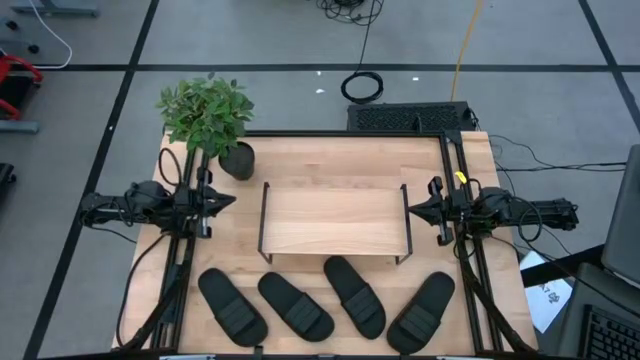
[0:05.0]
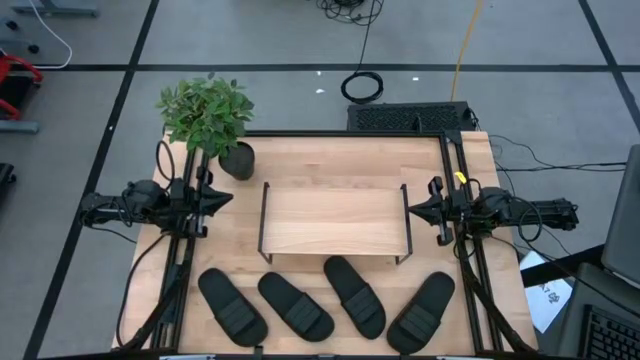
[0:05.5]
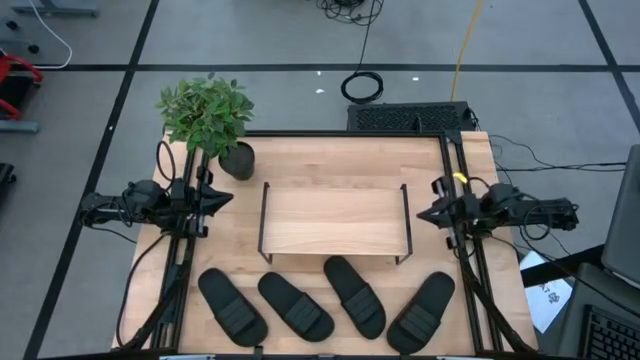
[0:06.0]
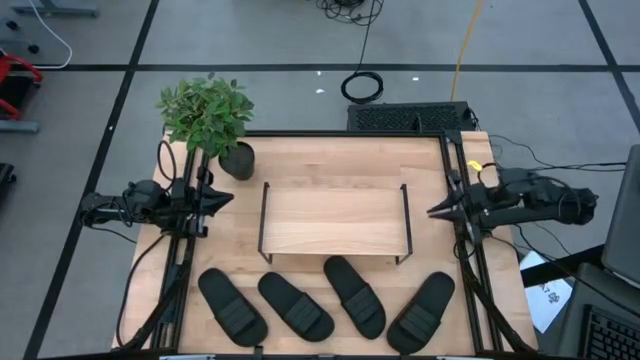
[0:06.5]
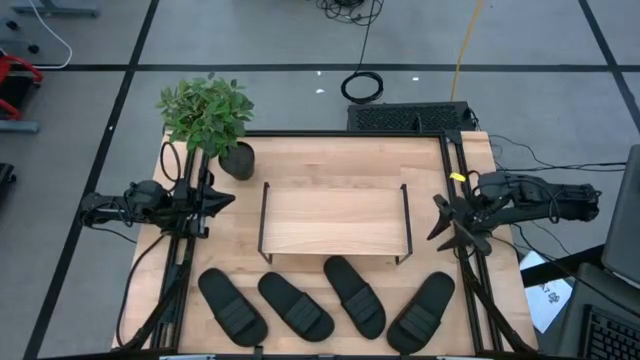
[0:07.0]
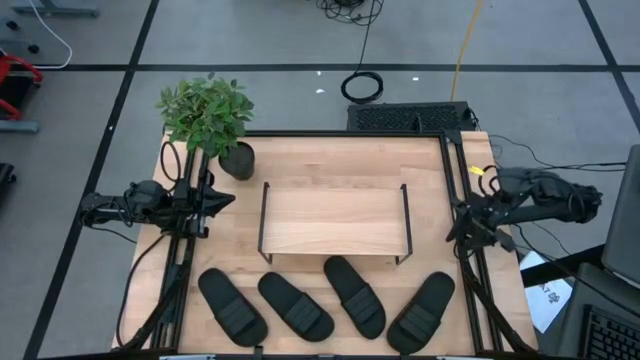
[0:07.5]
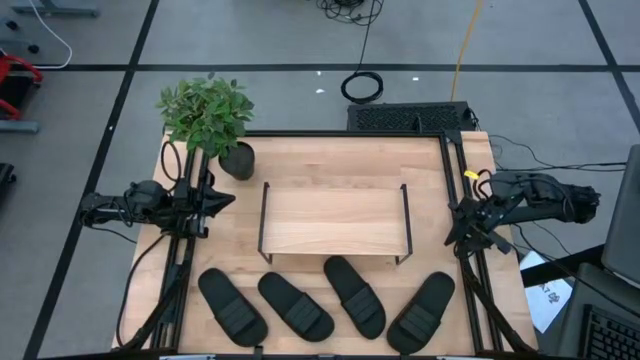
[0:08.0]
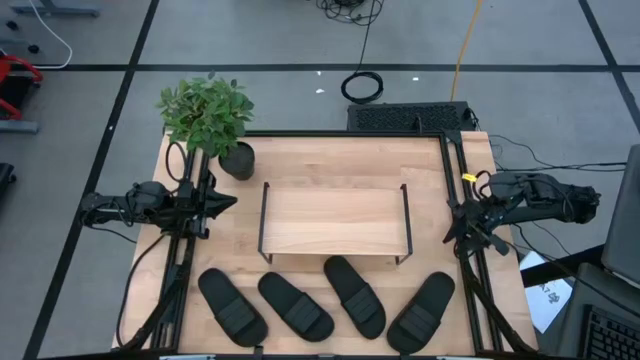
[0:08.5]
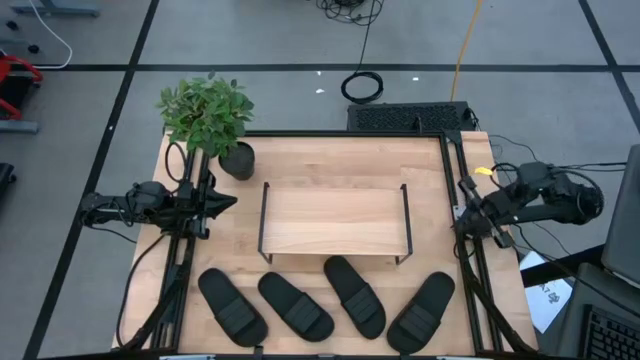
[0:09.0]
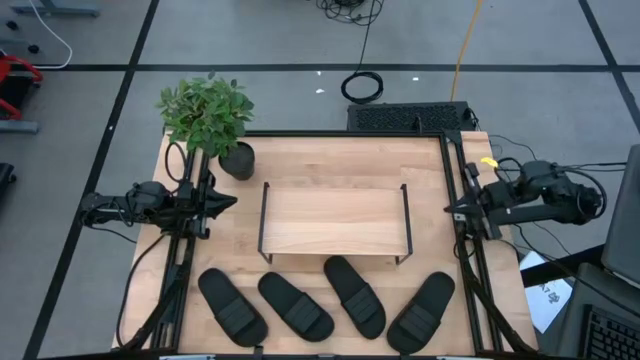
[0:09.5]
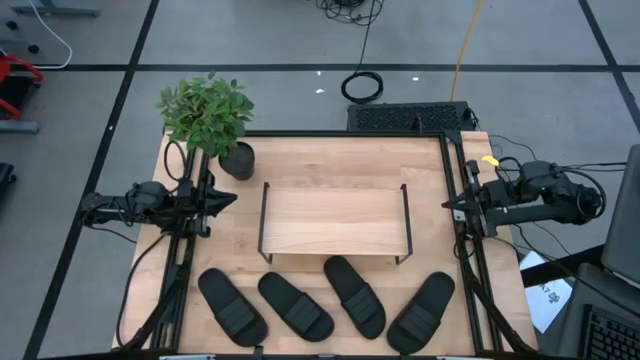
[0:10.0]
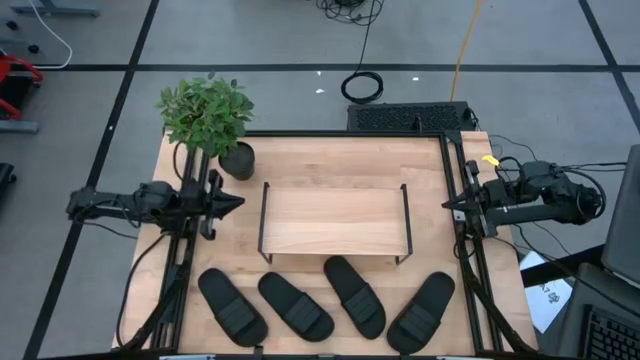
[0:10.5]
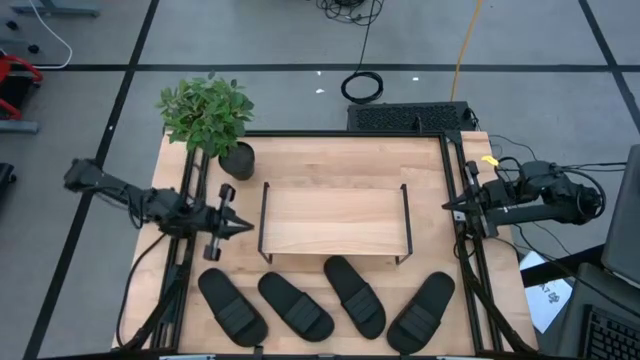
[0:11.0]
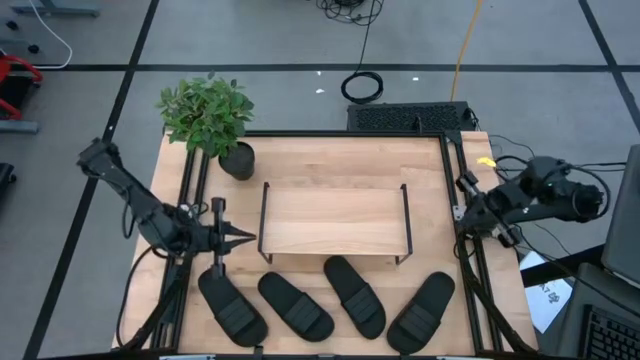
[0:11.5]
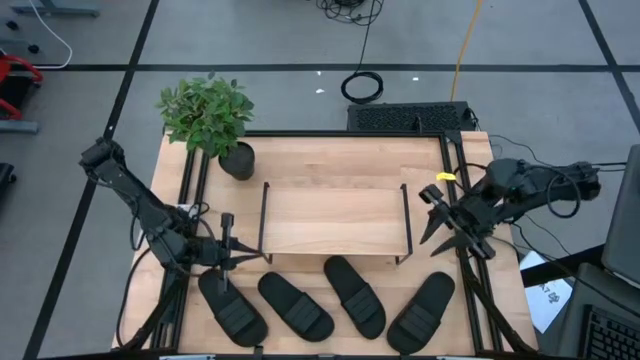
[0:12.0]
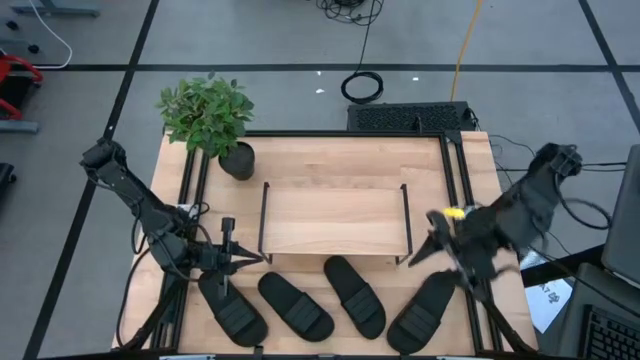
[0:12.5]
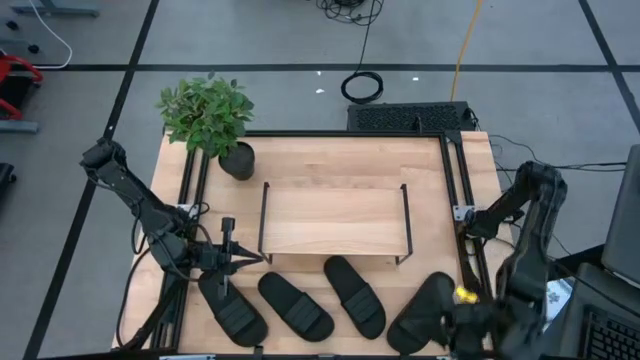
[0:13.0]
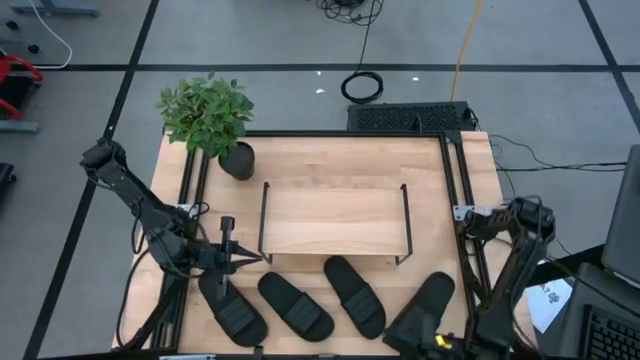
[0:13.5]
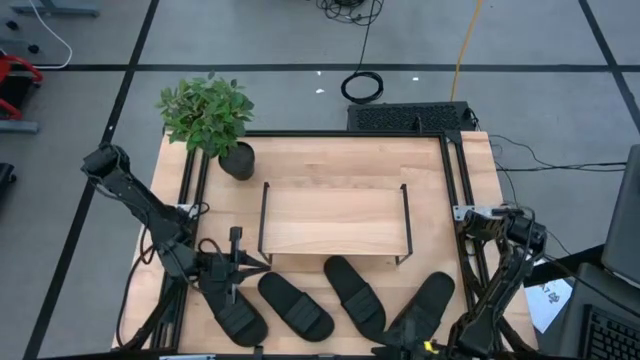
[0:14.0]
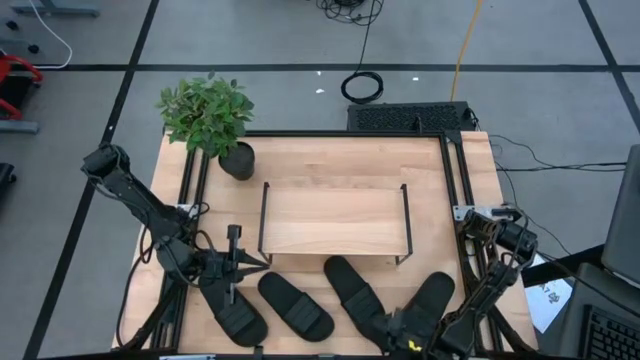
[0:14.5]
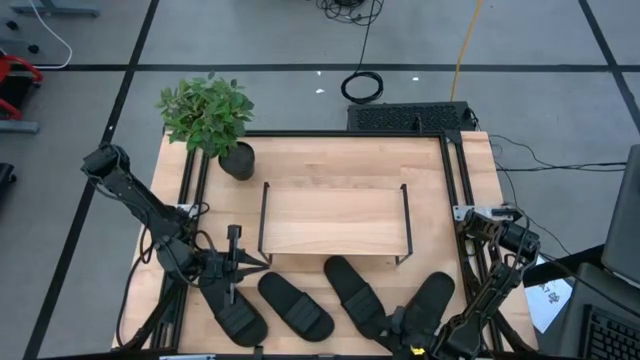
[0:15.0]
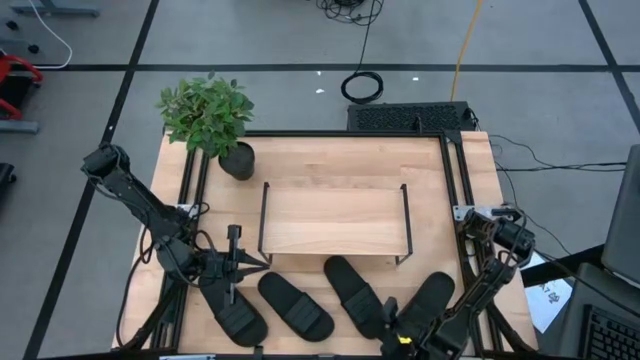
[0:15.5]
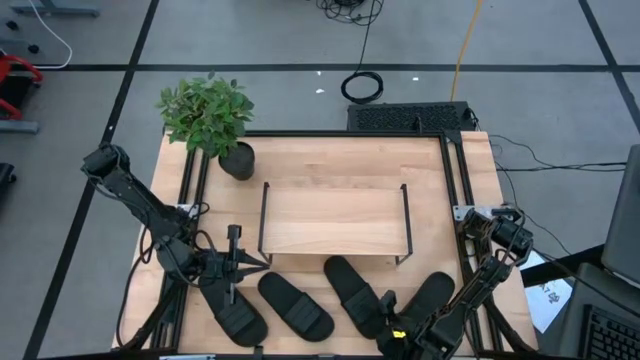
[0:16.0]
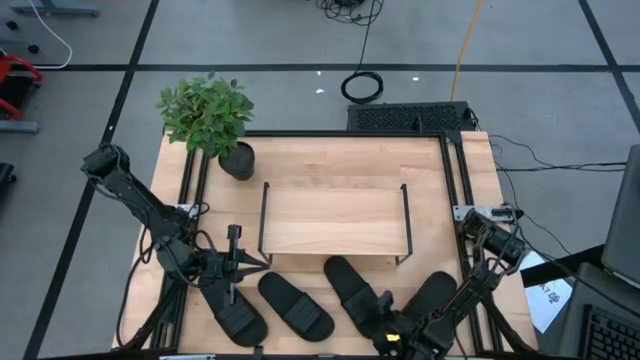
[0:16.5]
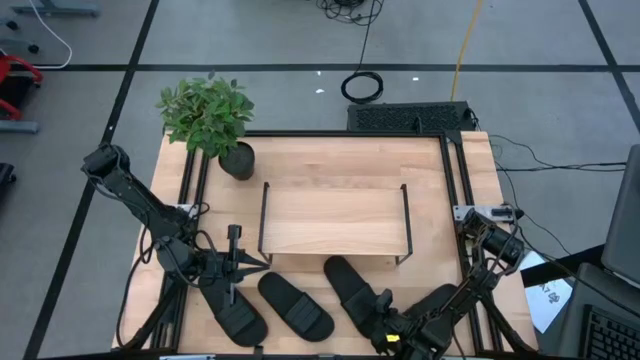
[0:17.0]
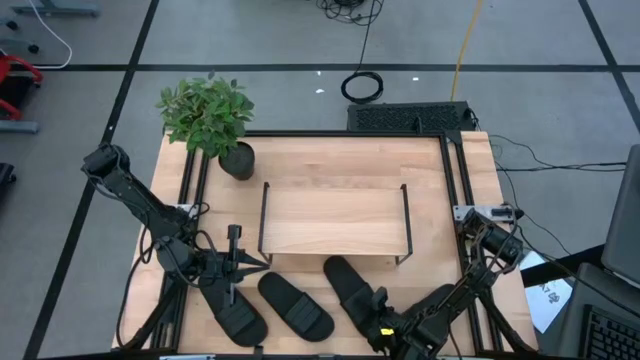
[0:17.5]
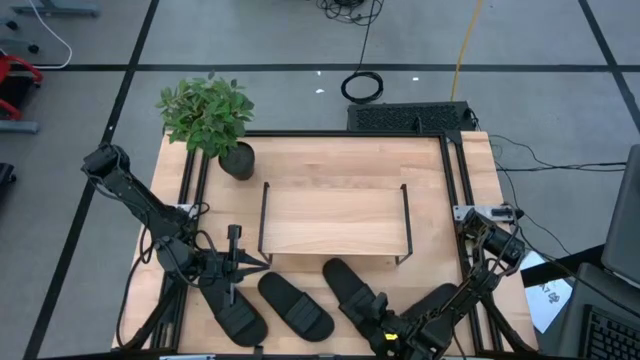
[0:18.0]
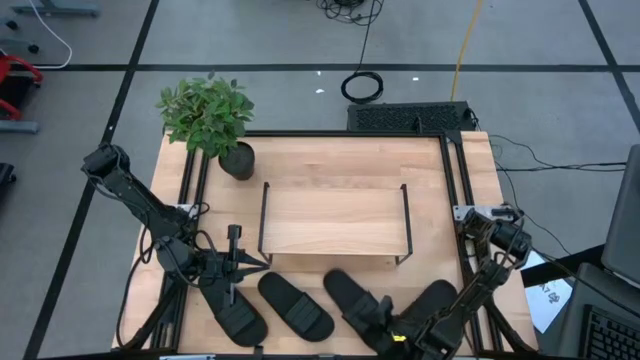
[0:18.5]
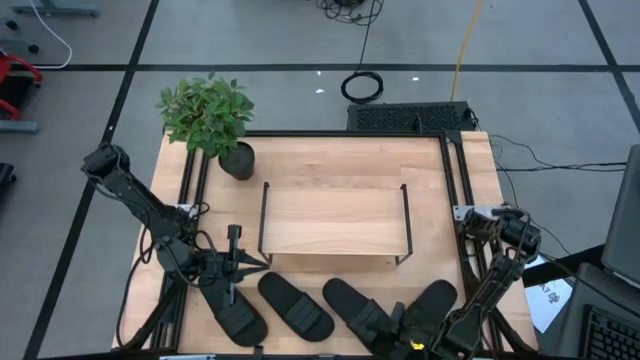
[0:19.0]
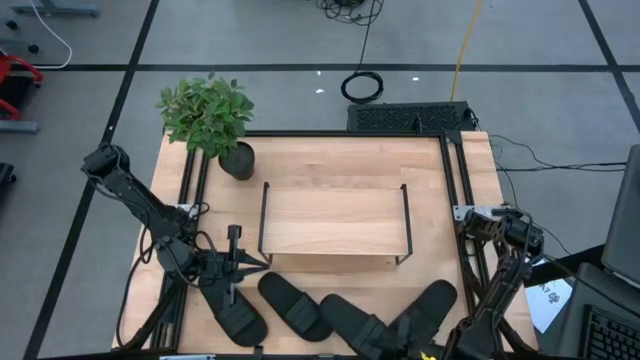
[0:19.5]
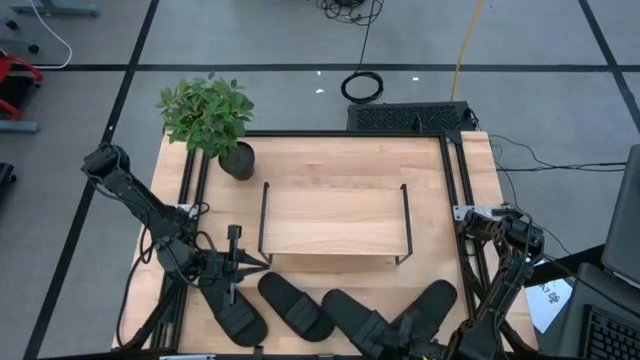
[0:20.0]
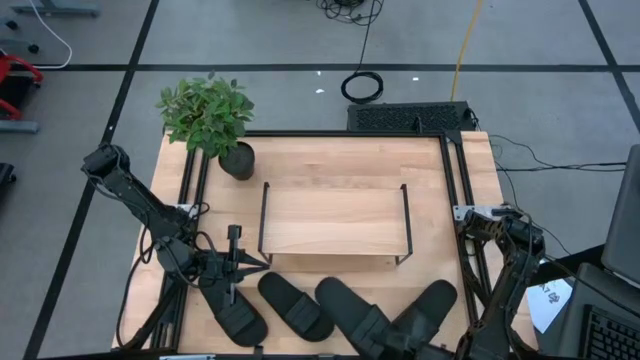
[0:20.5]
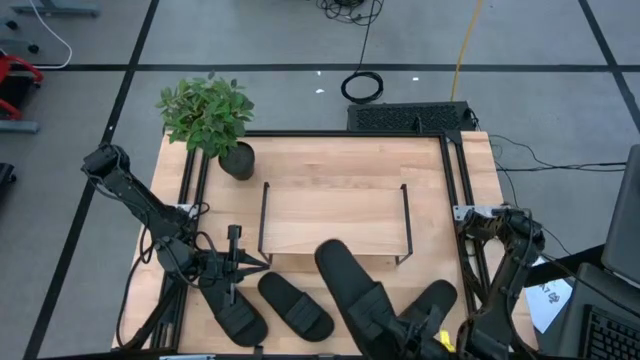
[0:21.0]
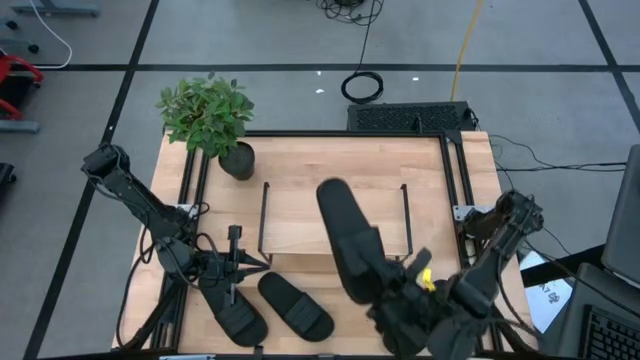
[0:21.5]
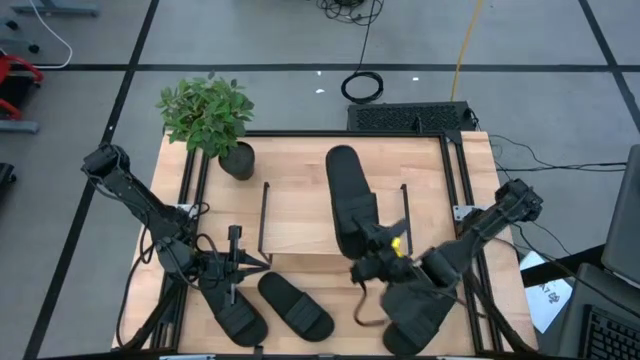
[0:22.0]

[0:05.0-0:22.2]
Task: Pick and place slides into the shelf
Put the black slide on the shelf
